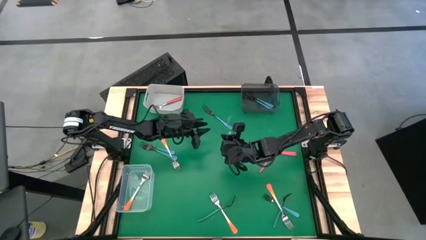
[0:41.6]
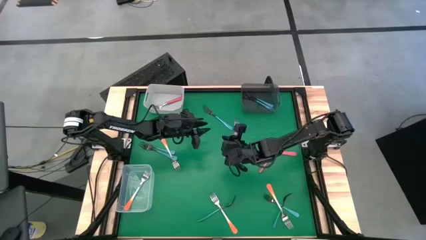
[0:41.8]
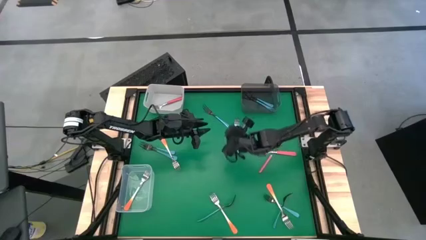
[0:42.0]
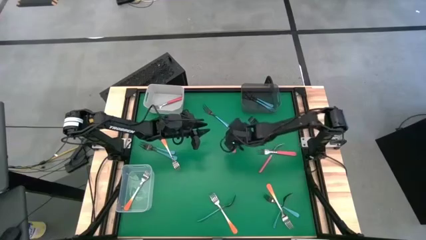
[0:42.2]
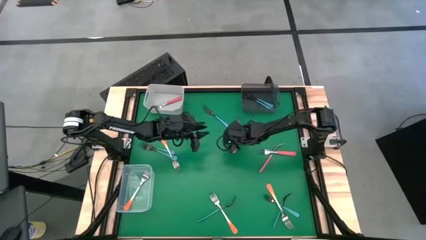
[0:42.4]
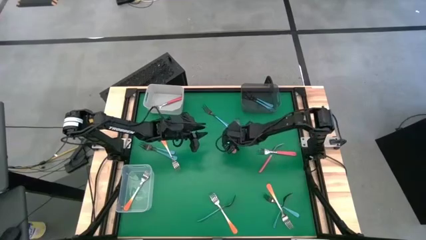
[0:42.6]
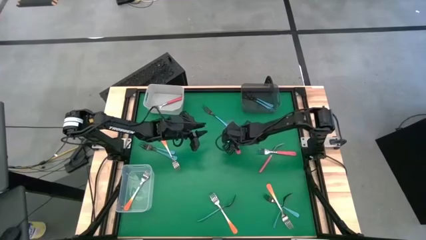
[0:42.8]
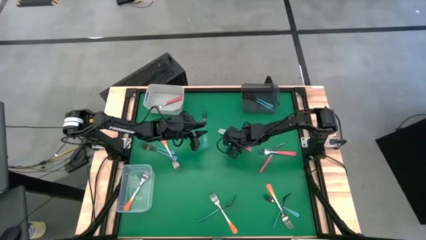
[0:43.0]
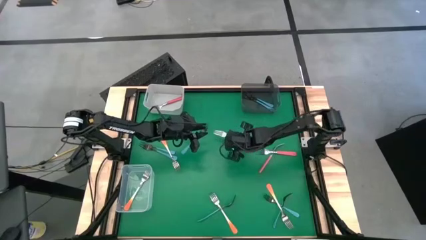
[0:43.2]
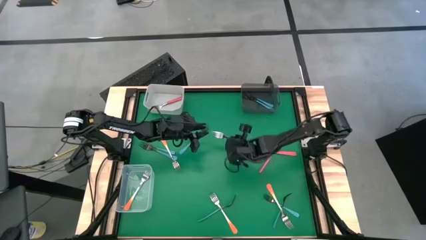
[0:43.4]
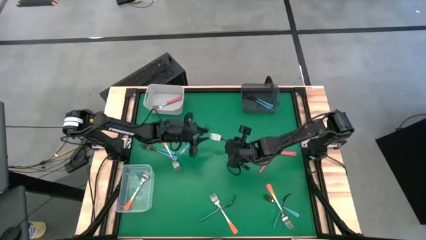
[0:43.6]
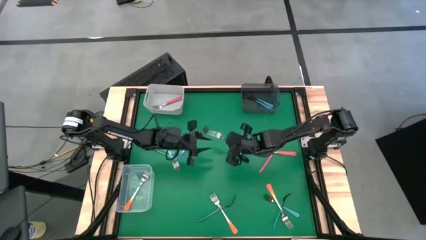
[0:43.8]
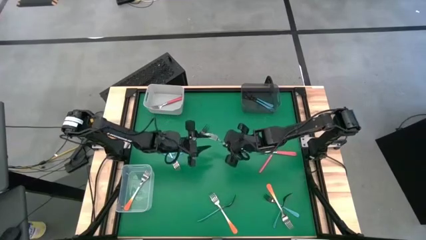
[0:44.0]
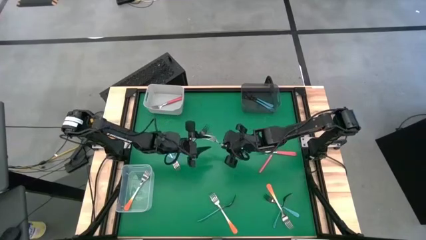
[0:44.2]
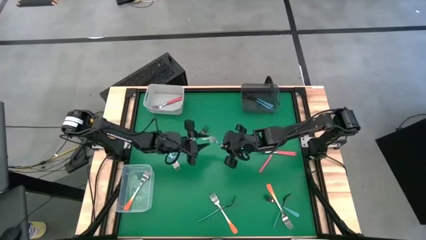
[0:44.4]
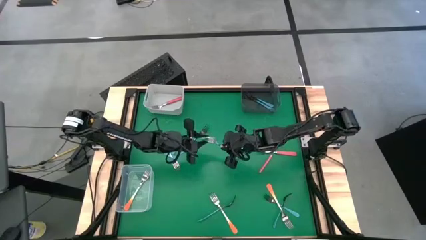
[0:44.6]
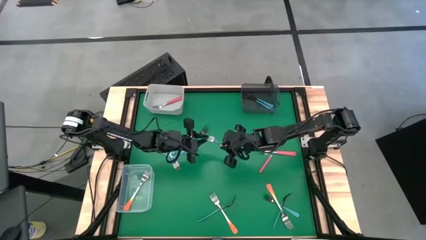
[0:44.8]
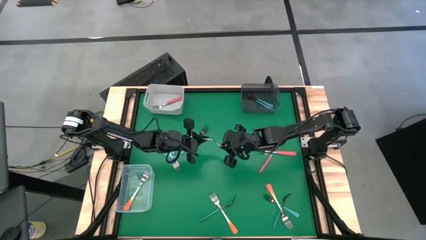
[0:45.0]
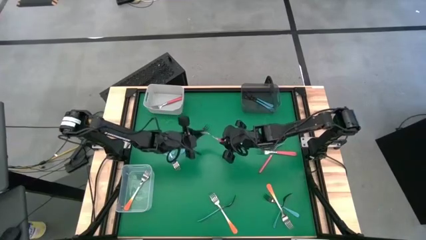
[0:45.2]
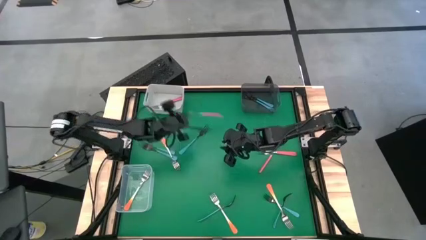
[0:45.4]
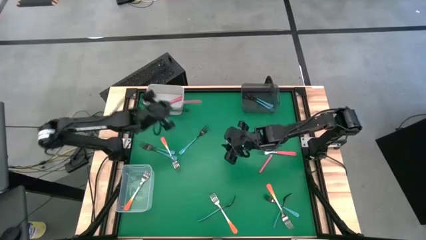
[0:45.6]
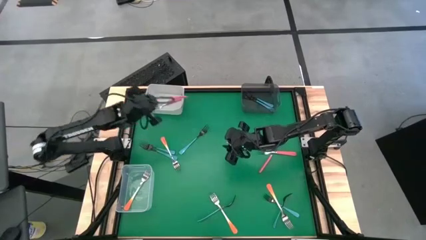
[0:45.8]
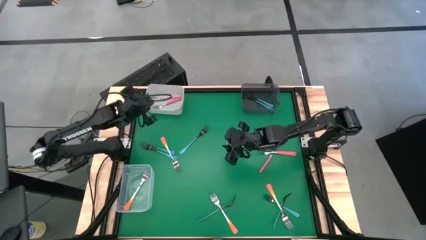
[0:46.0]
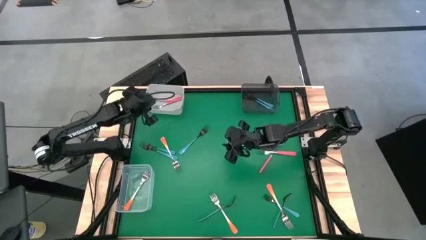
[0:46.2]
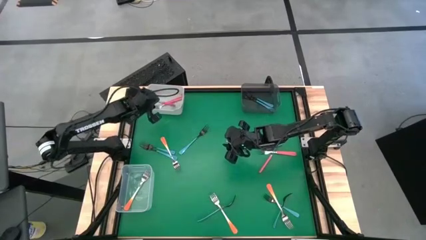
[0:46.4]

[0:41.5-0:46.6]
Task: Sort silverware by color (type)
Put the pink fork into the white bin

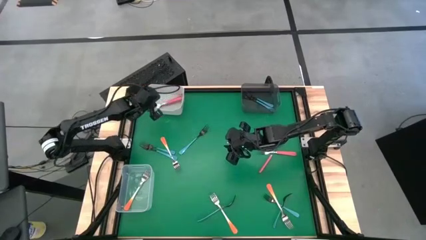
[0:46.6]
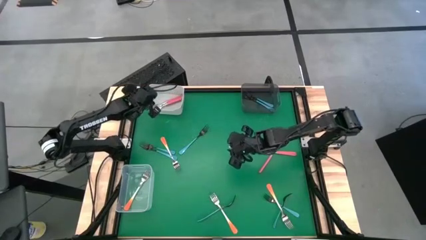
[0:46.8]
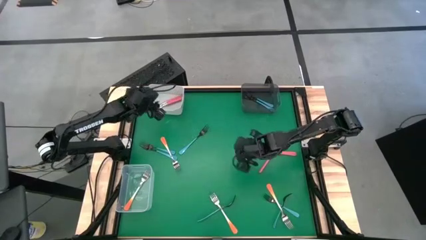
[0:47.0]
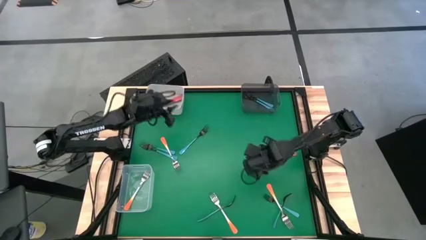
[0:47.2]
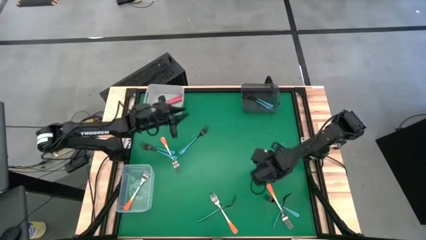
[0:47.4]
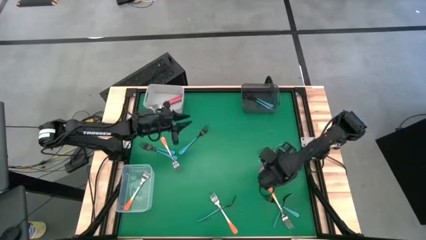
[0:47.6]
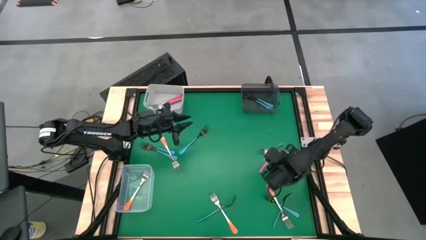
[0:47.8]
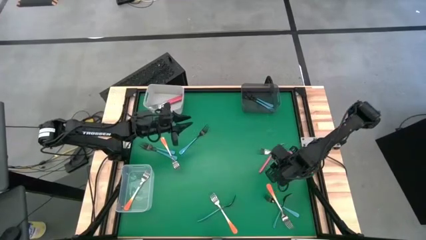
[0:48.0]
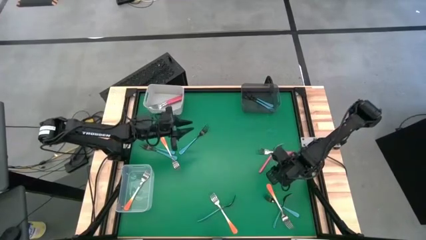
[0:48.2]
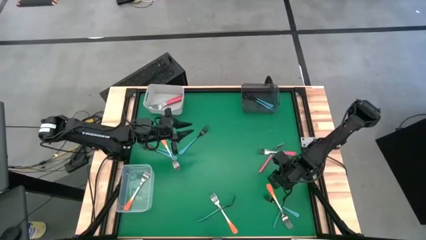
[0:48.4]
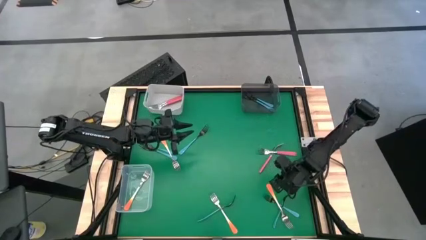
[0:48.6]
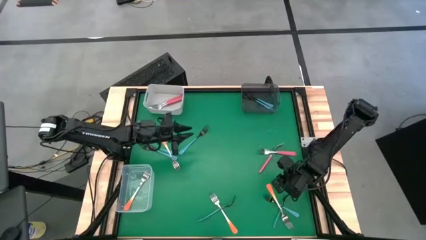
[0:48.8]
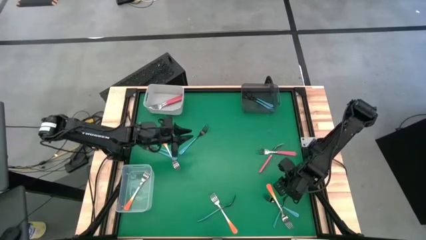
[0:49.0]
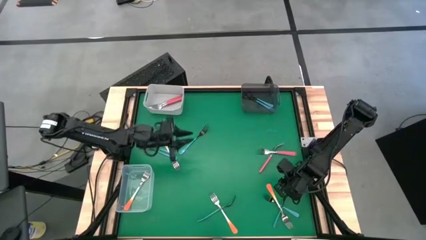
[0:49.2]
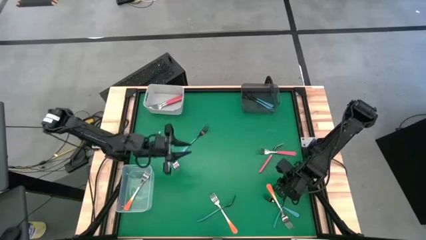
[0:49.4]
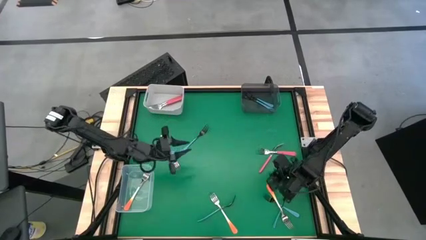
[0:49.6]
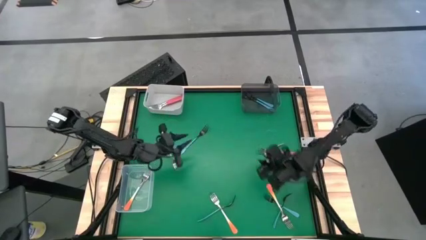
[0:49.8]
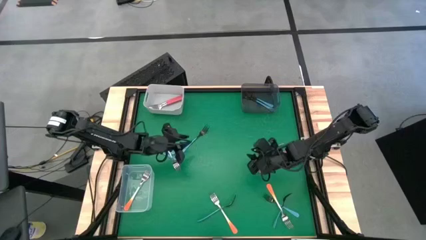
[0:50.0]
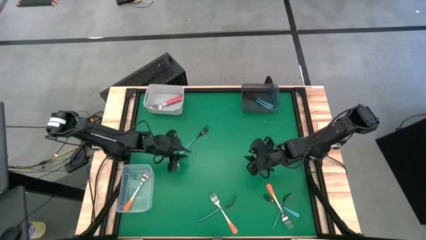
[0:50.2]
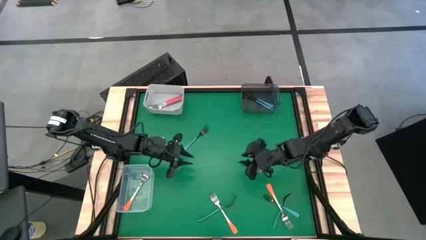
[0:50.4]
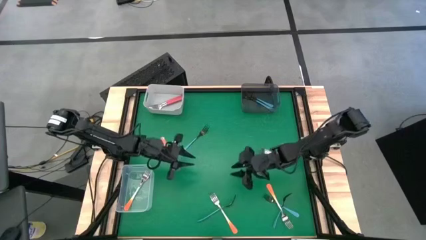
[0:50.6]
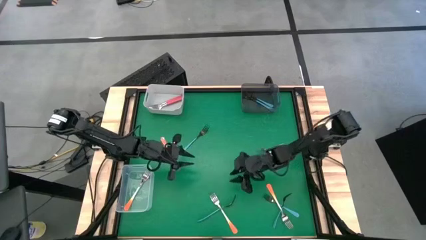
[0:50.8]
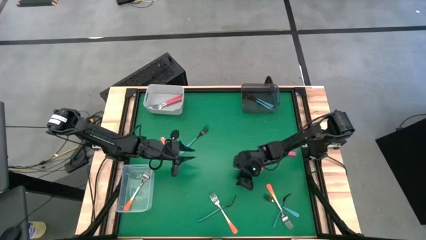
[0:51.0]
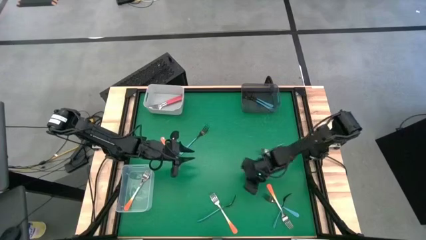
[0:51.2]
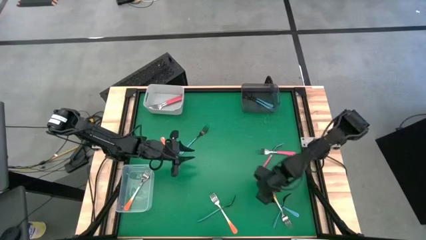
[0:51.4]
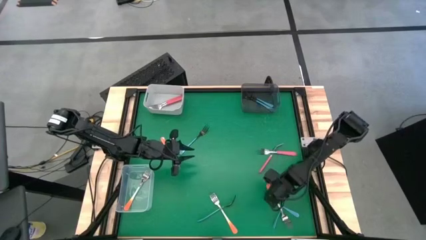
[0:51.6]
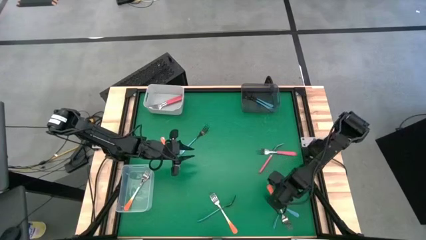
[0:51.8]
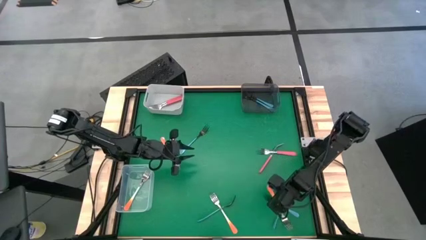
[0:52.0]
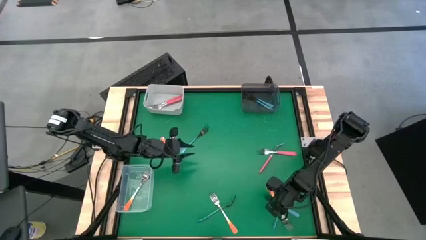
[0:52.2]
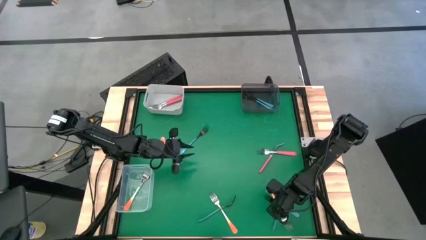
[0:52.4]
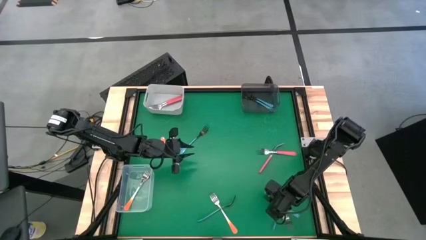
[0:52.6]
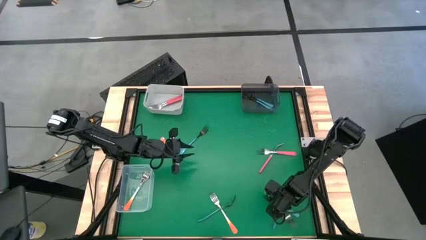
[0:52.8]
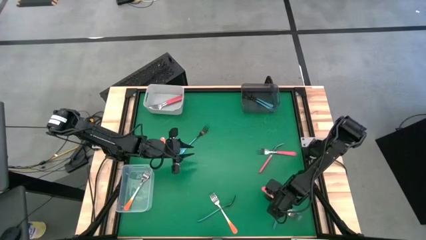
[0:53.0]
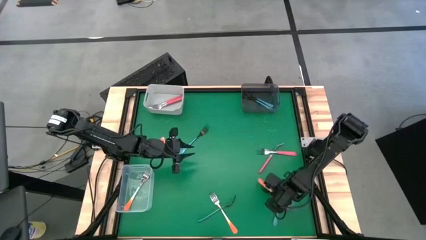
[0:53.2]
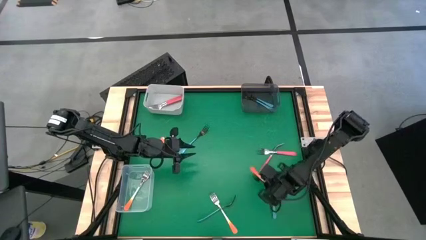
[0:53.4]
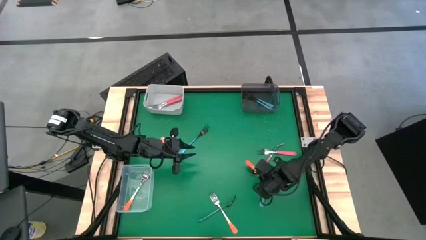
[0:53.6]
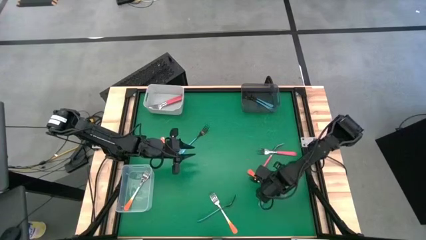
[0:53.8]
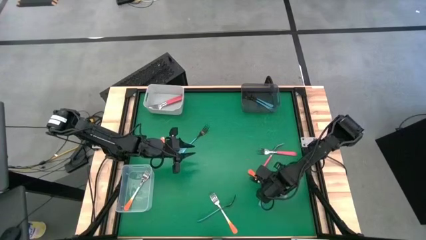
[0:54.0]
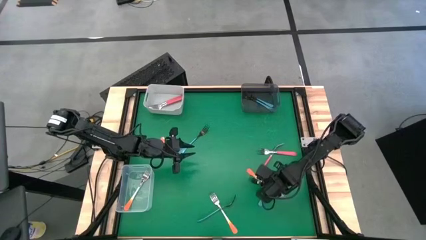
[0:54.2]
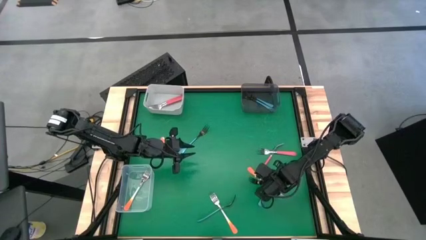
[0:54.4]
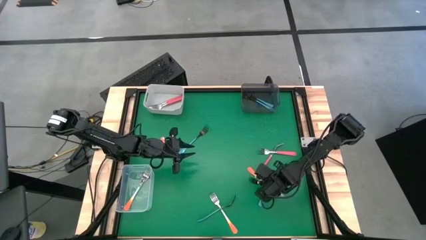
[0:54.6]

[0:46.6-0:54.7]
Put the orange fork into the transparent bin

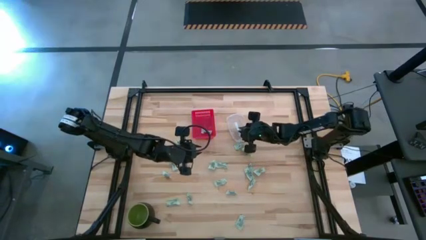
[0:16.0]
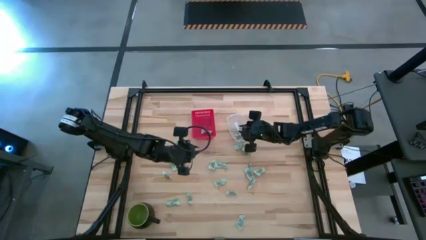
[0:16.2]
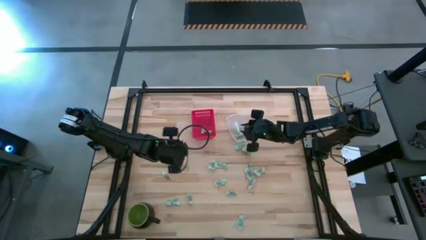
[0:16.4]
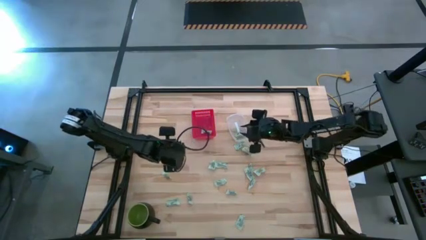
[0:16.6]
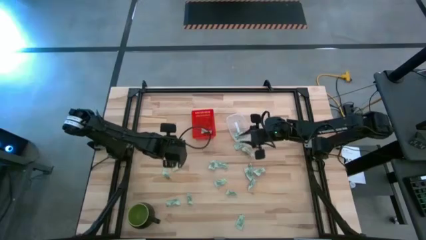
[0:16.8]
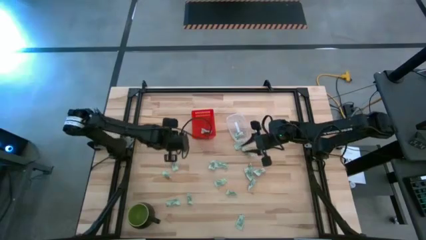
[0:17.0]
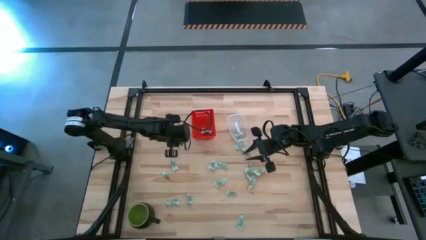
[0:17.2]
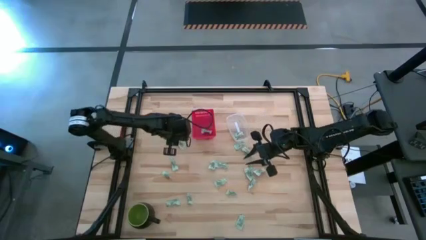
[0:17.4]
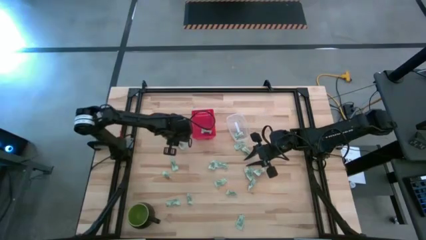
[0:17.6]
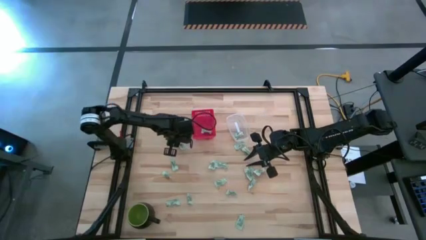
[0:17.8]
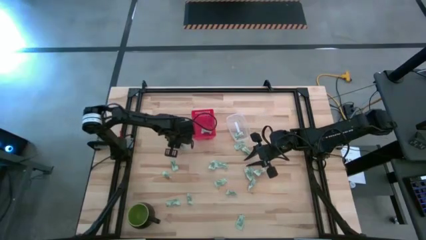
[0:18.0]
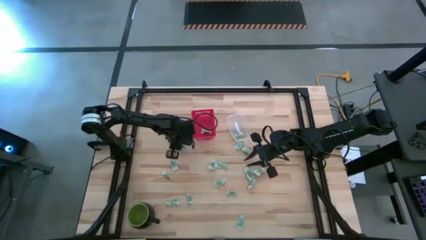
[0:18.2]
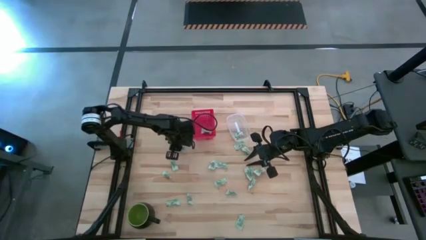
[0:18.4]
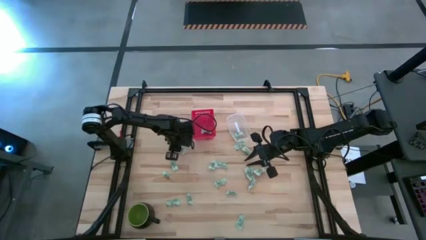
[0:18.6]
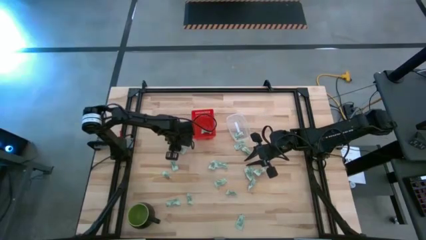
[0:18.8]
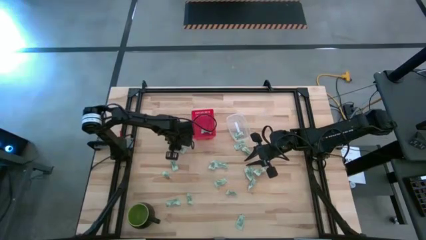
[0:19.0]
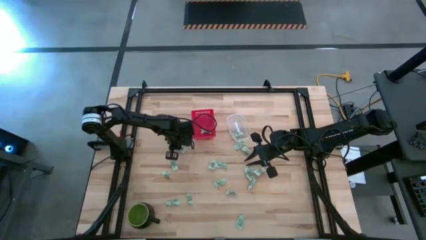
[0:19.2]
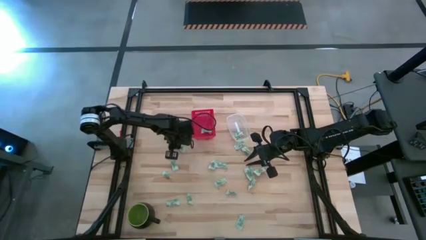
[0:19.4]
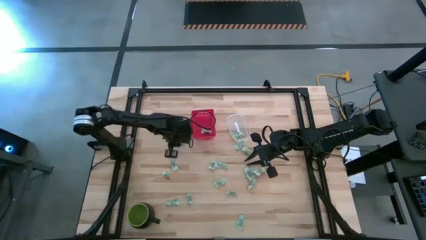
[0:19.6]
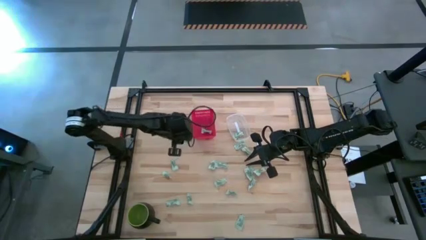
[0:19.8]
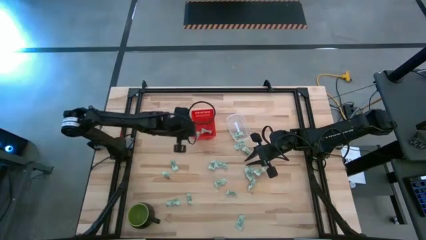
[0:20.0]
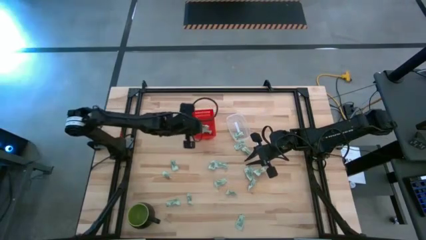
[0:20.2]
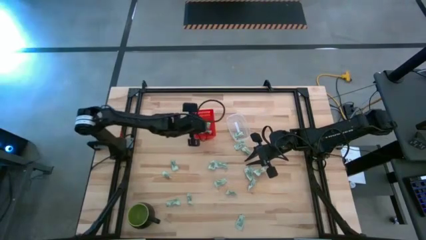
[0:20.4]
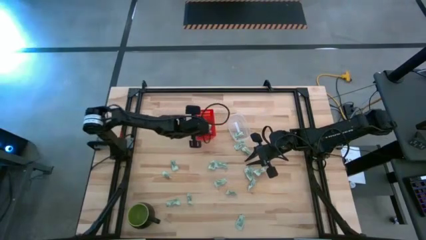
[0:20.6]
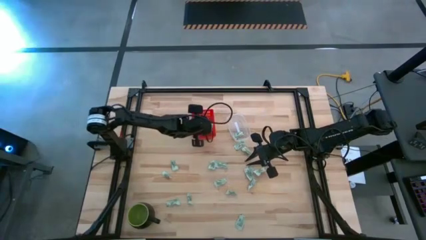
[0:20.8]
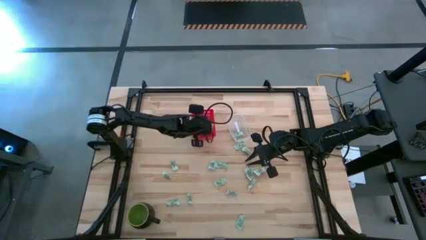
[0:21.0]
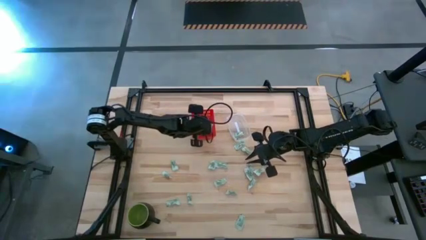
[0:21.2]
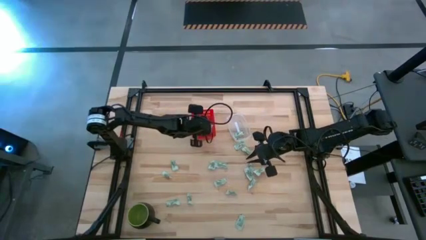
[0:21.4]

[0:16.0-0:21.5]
Task: Pick and place items into bin
Put the white stevia packet into the red bin
